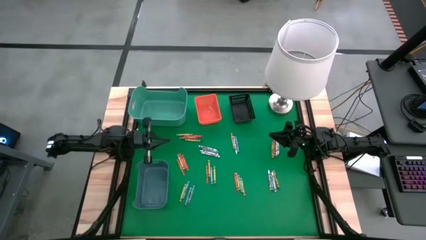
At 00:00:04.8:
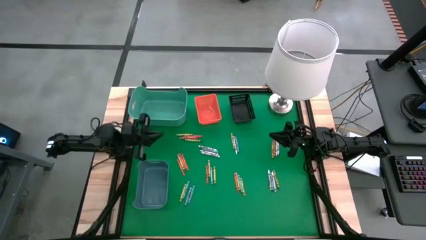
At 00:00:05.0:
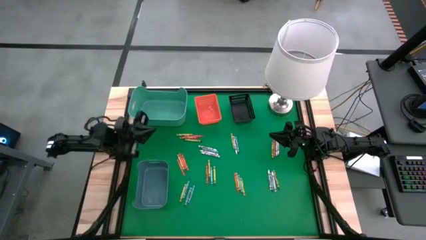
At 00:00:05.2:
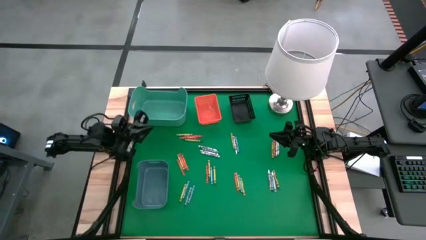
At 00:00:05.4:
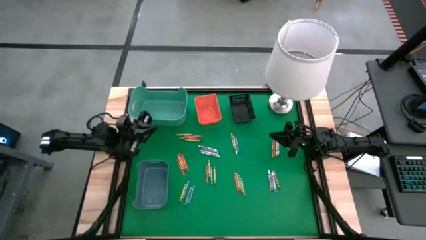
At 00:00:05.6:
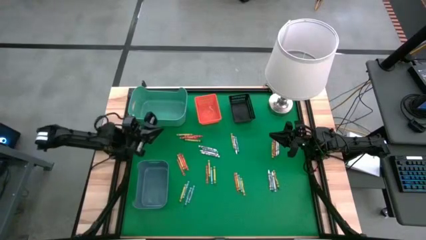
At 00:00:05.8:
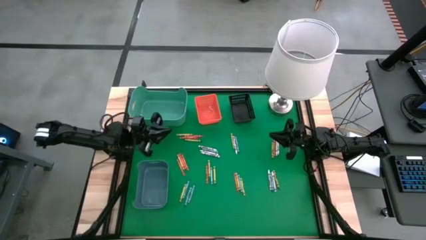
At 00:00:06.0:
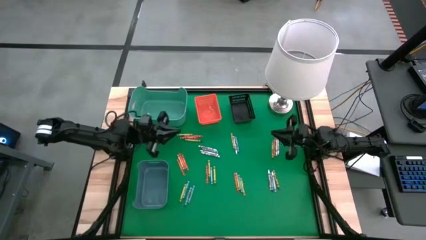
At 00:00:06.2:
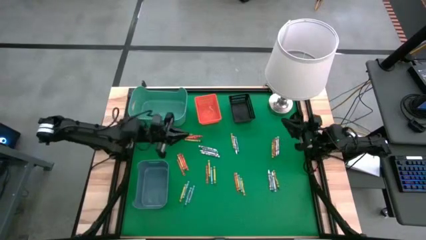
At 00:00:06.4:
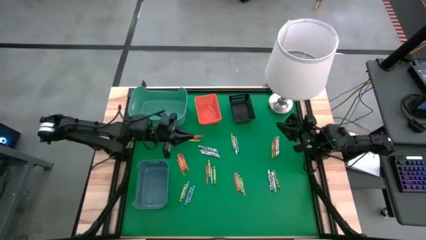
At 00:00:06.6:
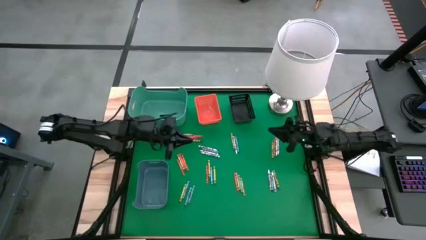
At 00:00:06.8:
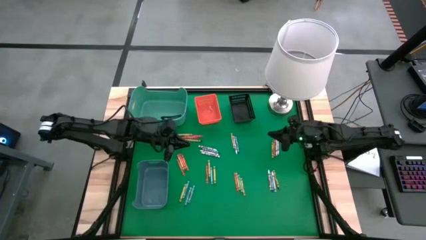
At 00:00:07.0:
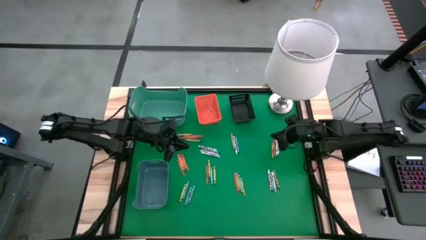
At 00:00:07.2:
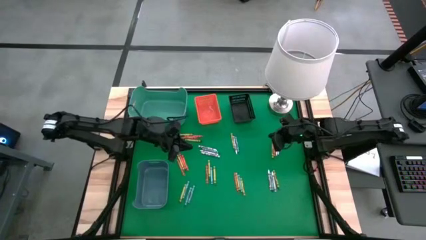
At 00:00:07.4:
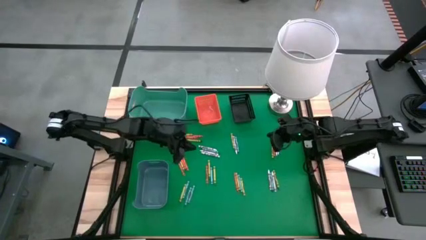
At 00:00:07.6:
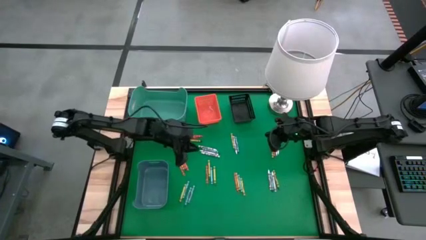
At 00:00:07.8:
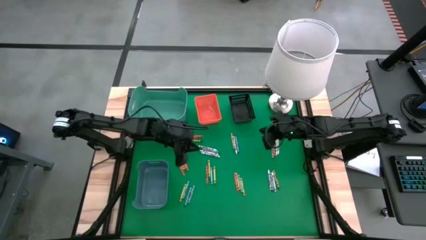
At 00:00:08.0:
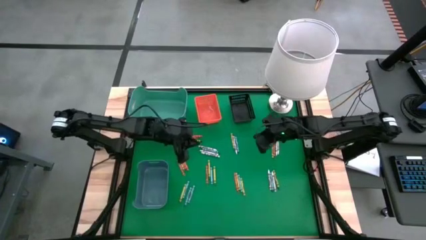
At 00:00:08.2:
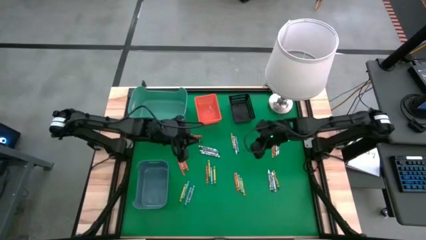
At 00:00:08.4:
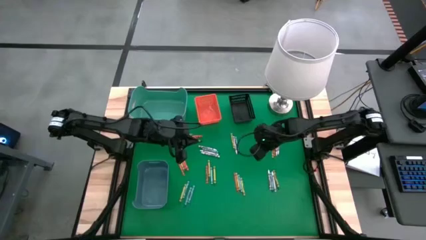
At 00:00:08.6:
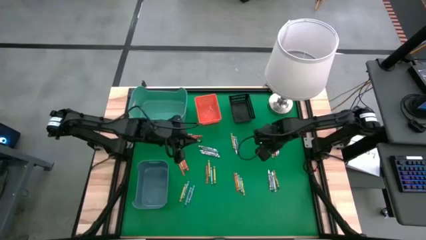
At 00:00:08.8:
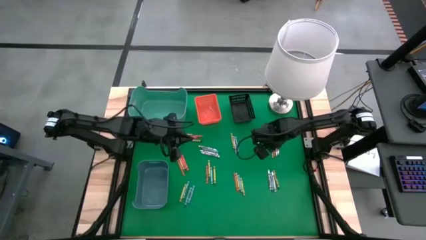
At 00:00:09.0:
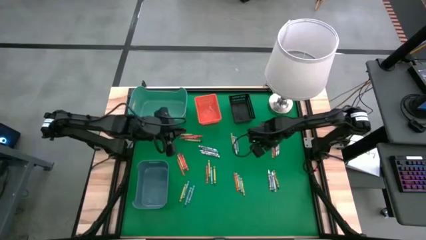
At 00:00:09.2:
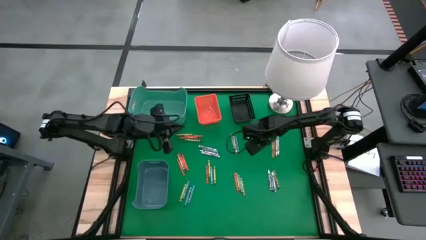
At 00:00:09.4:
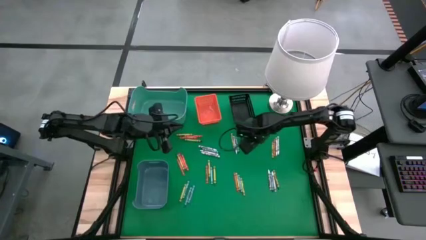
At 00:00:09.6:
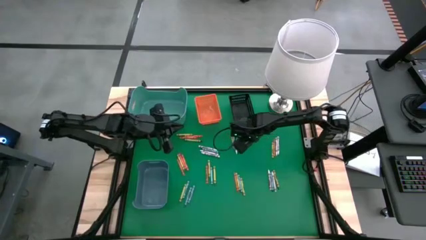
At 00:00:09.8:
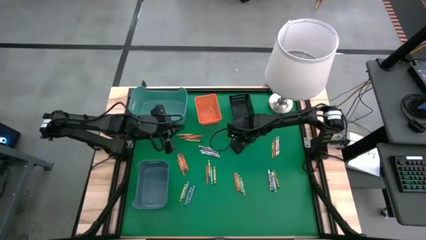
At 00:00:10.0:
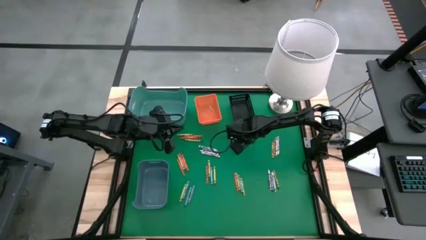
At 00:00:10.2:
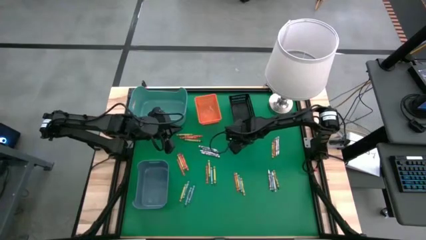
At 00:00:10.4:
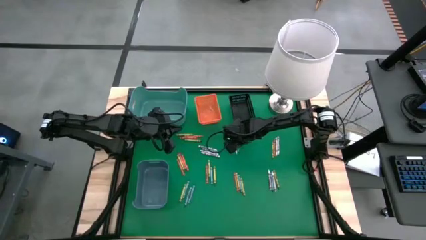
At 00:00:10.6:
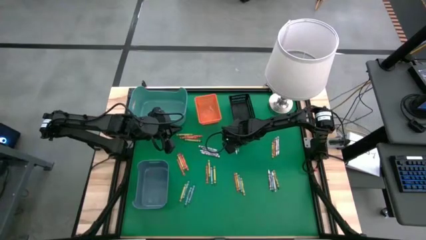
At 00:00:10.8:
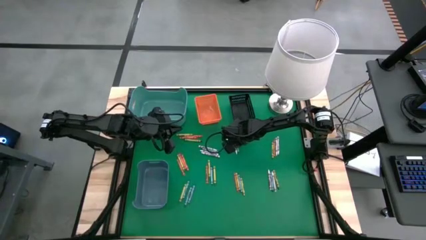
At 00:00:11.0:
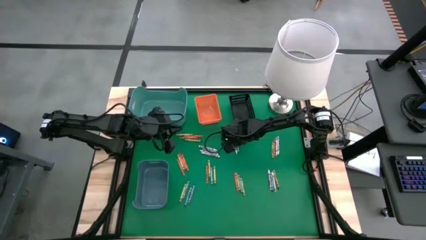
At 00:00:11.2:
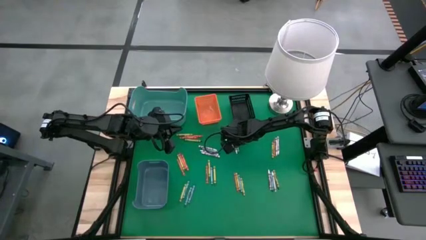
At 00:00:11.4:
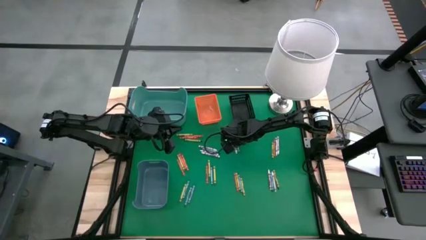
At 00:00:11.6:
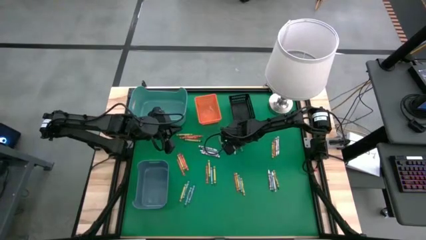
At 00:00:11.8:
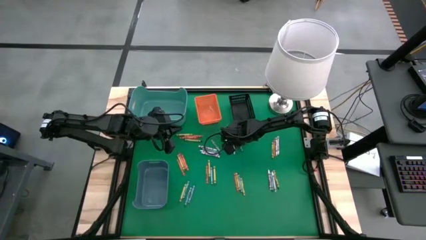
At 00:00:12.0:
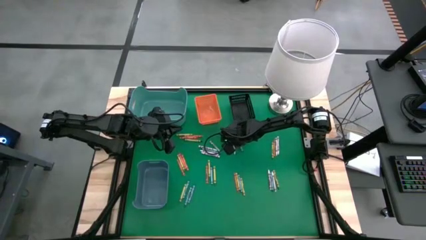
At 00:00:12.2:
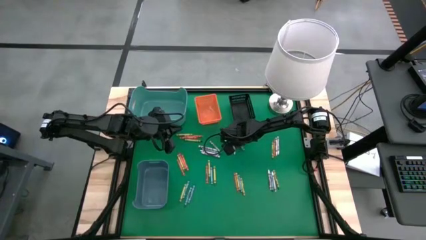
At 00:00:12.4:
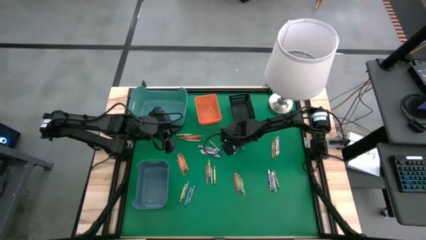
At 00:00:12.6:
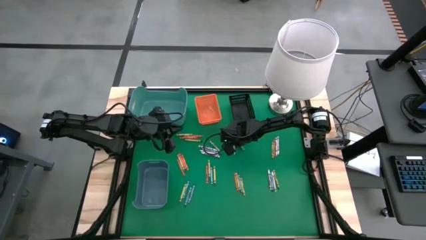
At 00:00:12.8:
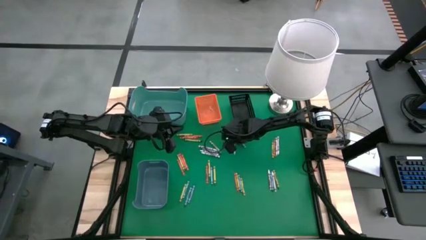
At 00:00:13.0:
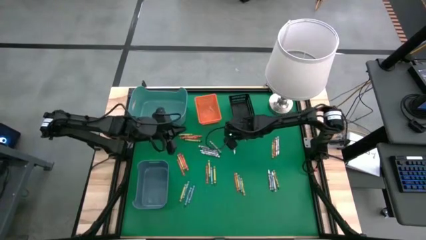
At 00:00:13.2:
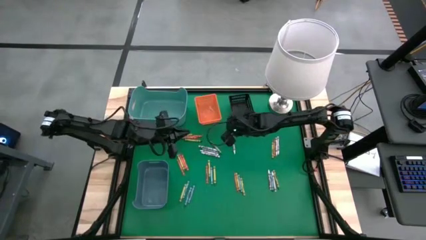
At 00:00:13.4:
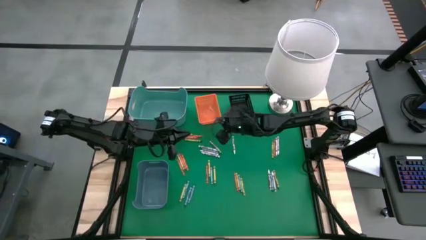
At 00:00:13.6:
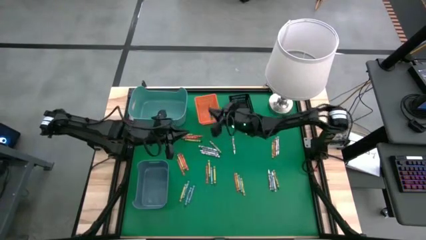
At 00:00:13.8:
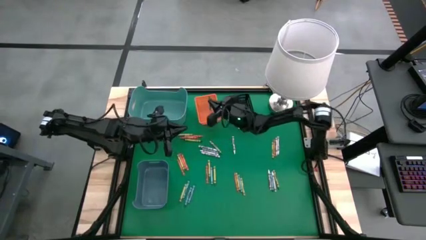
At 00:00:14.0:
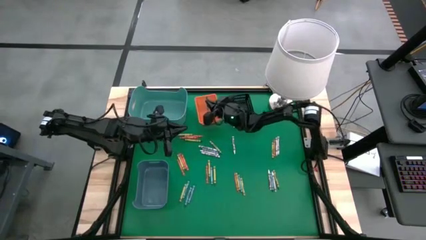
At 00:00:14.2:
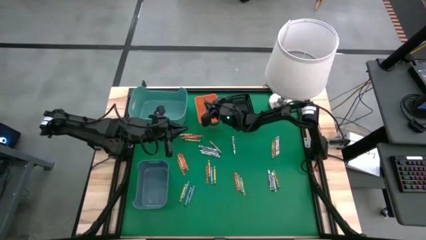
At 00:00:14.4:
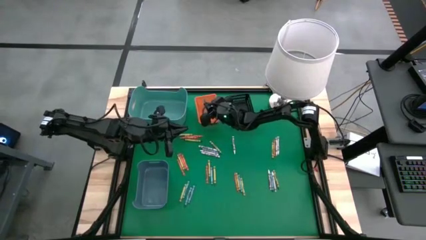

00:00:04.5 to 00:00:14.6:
Task: Sort crayons
Put the blue crayon into the orange bin

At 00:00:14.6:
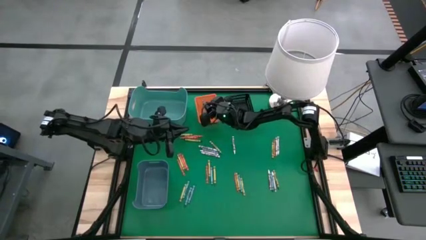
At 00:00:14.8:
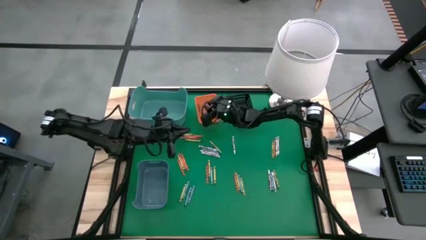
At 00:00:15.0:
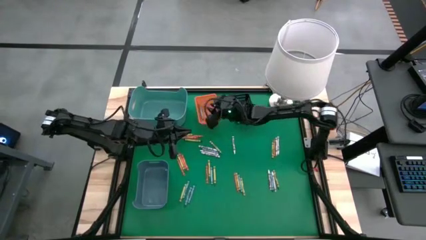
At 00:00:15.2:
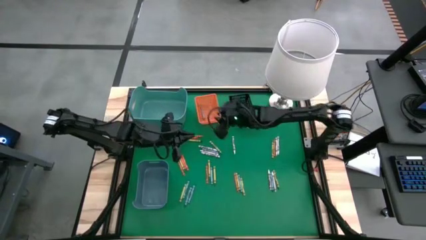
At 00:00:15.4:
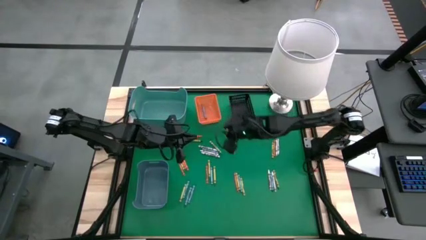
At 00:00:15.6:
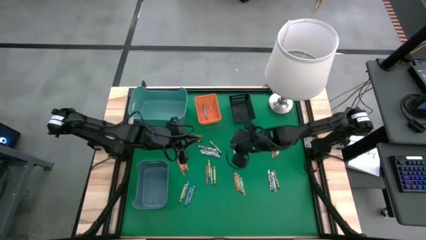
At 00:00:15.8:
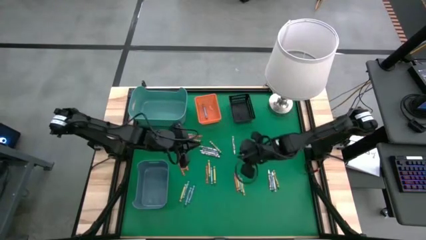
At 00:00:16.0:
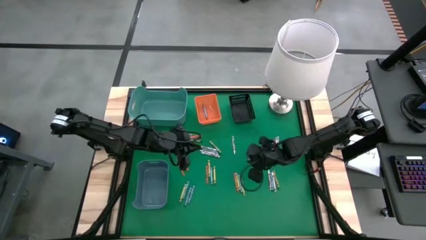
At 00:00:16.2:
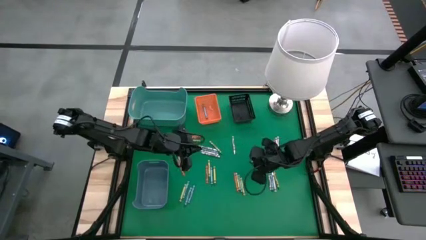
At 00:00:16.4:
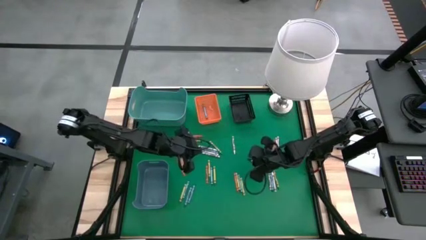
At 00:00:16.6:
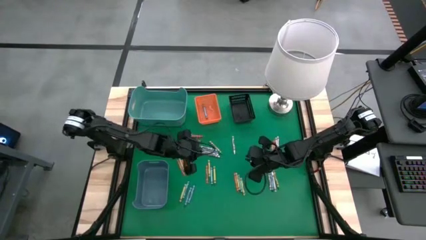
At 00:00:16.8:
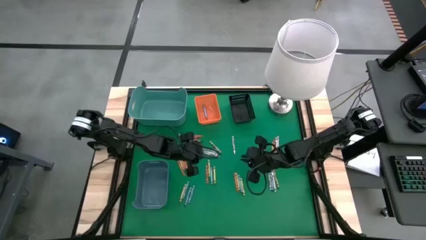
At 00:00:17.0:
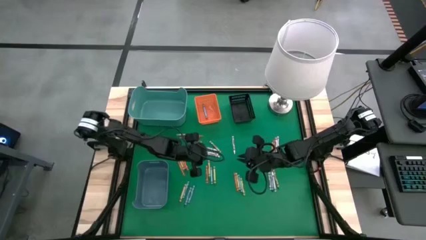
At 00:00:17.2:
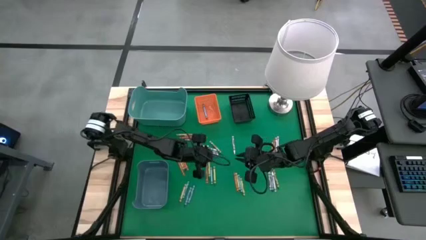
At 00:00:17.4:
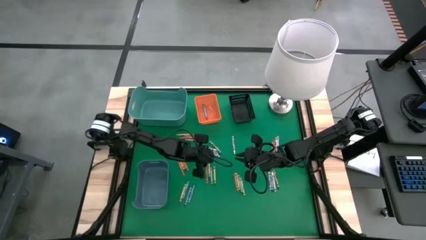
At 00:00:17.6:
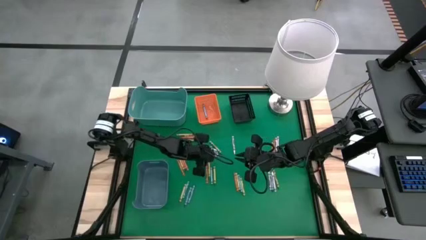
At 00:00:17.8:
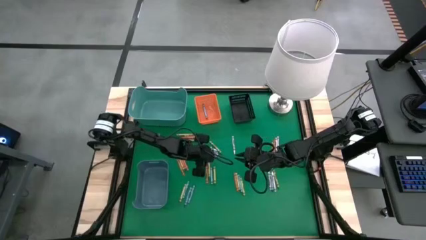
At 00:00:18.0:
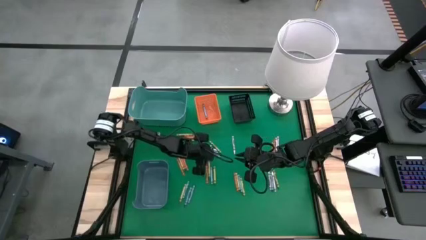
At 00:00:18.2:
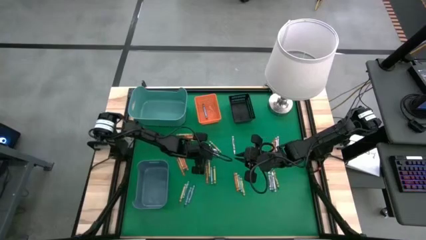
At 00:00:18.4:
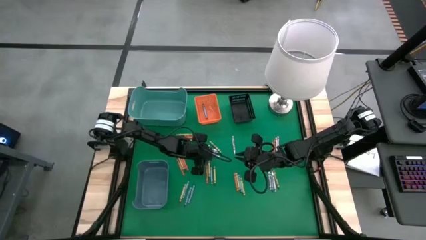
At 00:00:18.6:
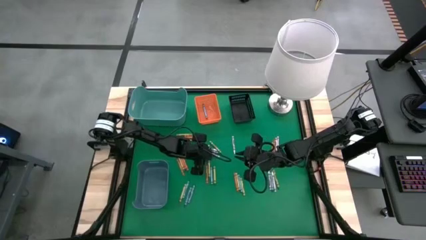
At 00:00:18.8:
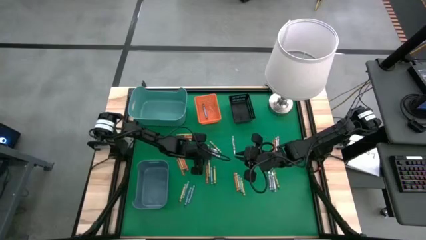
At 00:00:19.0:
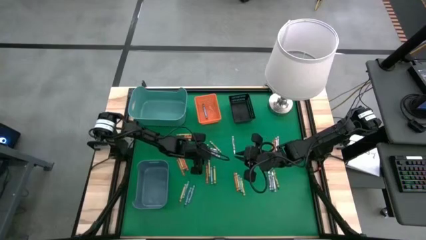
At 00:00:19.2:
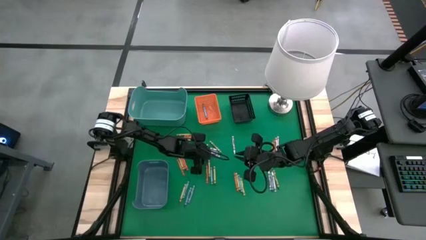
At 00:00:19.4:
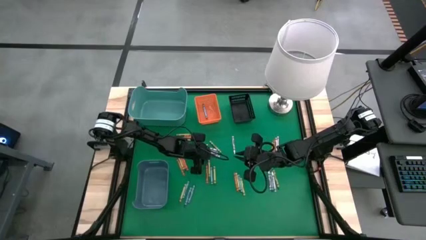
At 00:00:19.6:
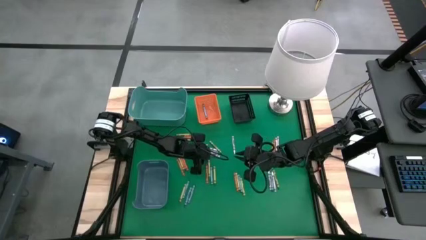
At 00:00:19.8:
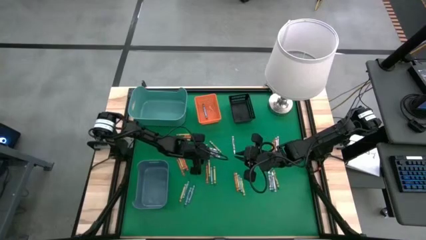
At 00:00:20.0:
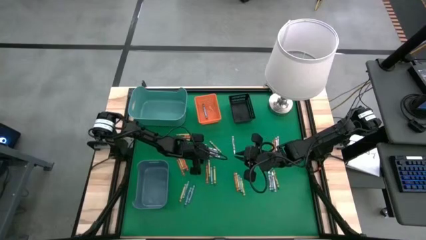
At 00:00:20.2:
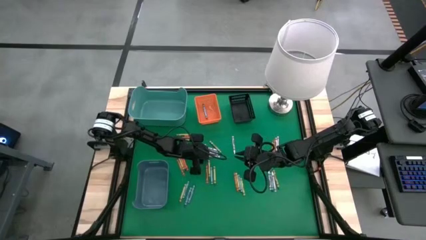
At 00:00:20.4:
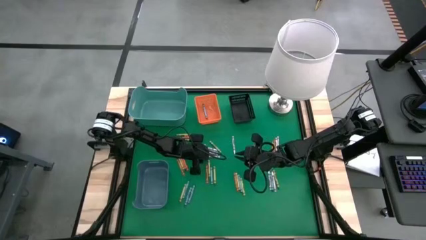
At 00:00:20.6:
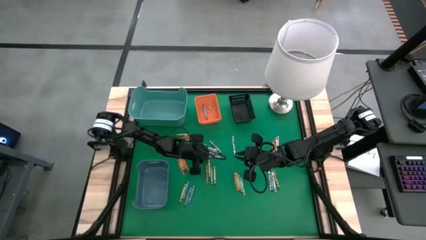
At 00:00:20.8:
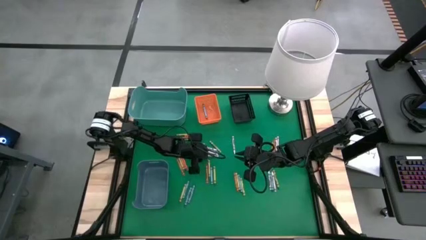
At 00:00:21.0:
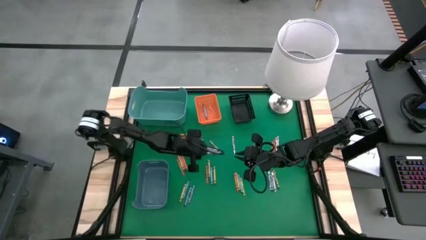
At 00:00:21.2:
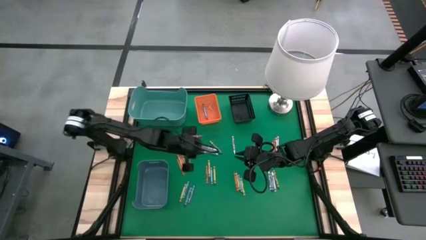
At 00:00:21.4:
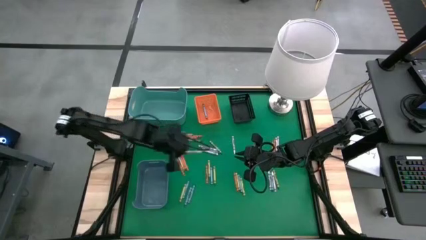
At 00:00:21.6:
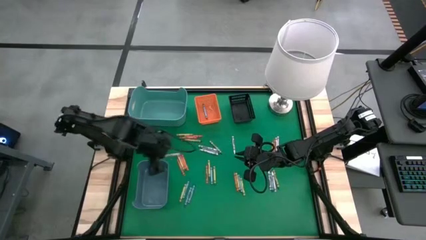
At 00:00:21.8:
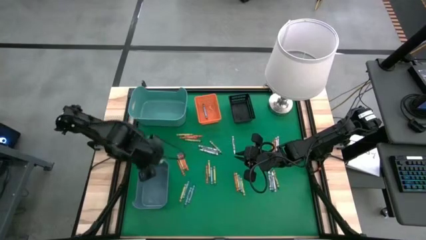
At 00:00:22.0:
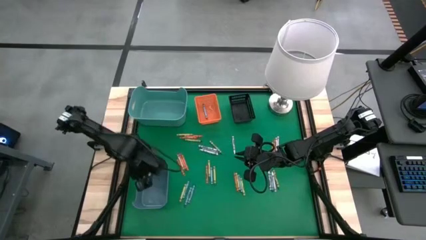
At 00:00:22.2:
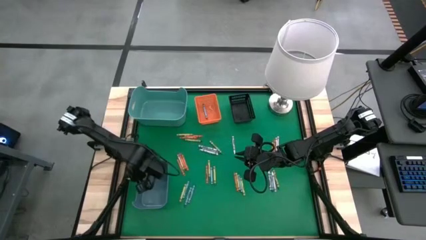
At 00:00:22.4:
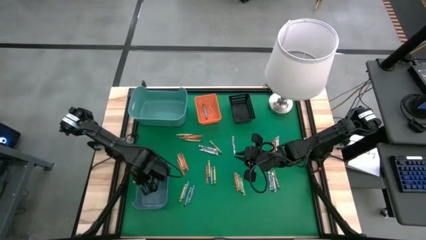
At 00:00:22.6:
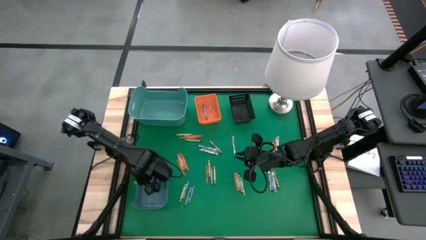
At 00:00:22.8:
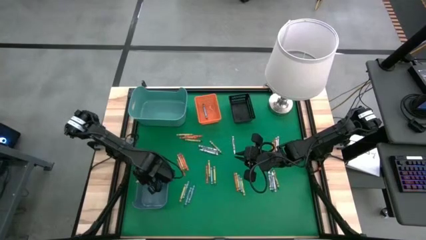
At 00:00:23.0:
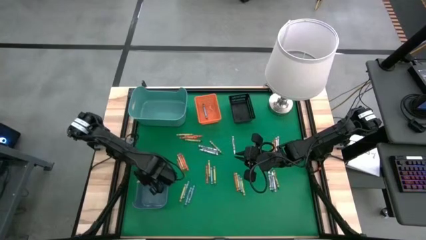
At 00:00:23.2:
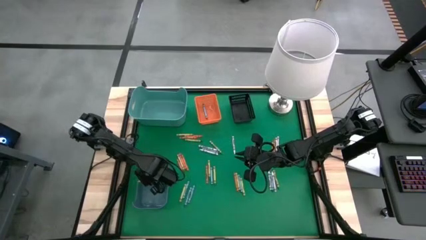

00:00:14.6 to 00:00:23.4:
Put the white crayon into the blue bin
